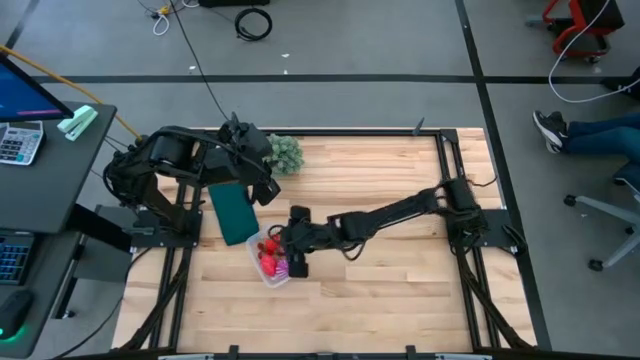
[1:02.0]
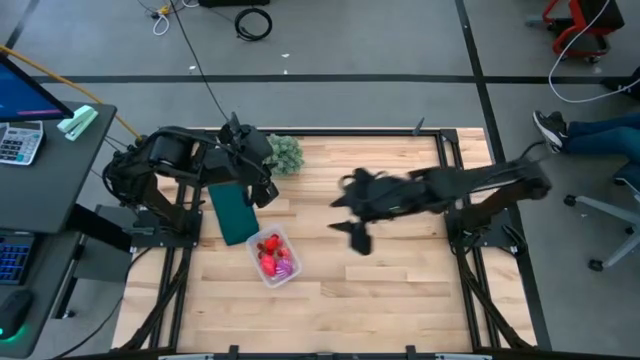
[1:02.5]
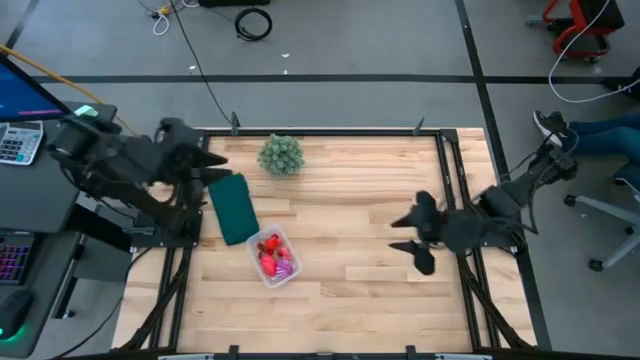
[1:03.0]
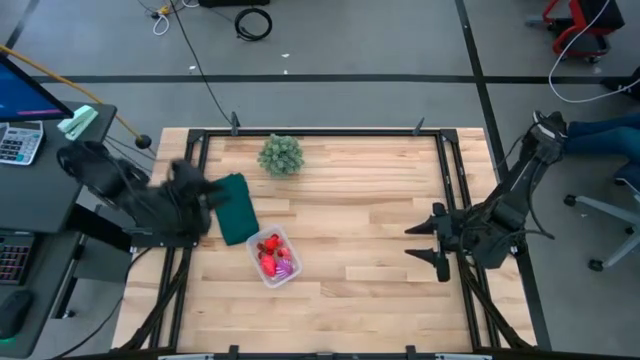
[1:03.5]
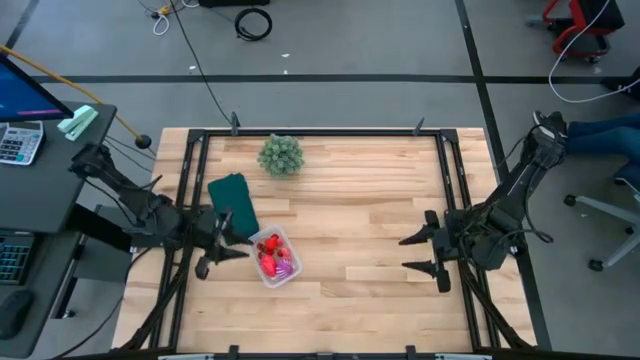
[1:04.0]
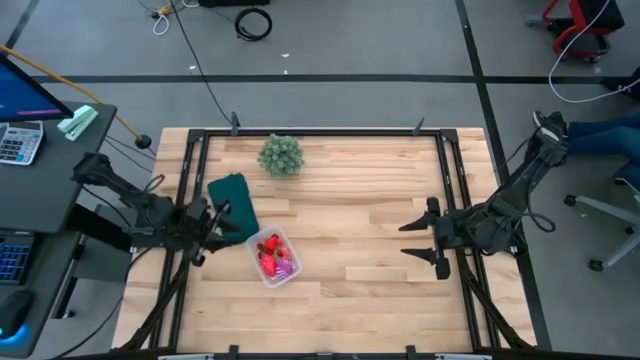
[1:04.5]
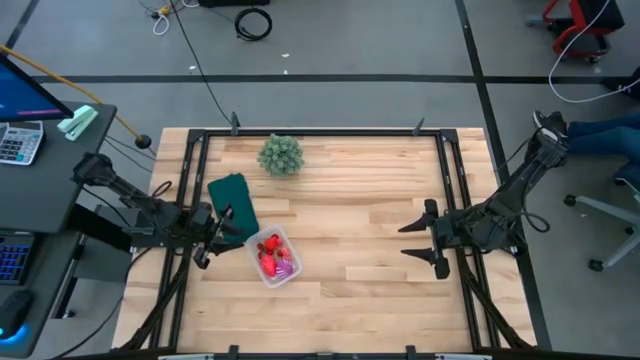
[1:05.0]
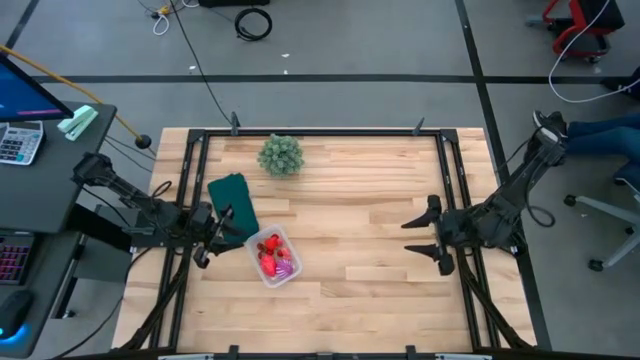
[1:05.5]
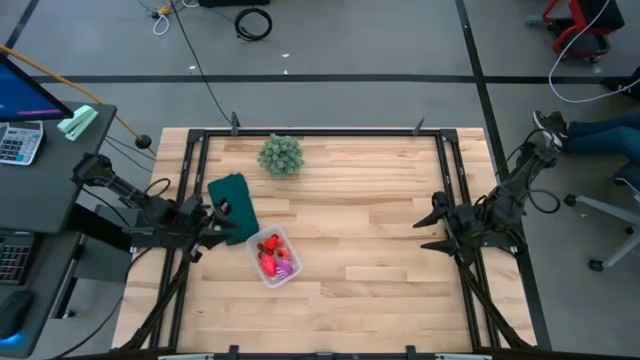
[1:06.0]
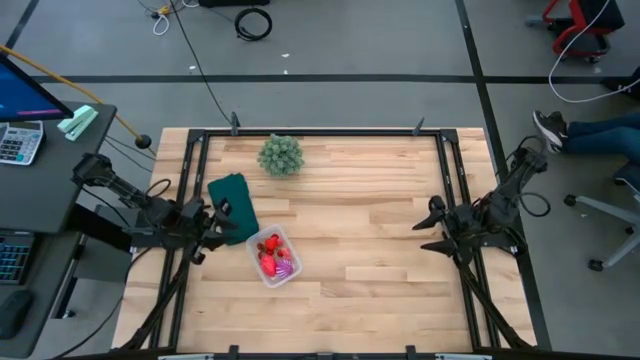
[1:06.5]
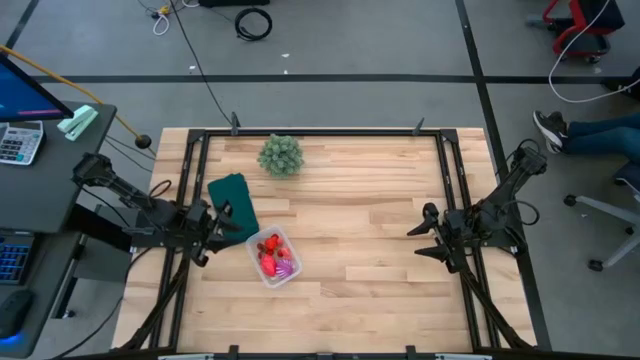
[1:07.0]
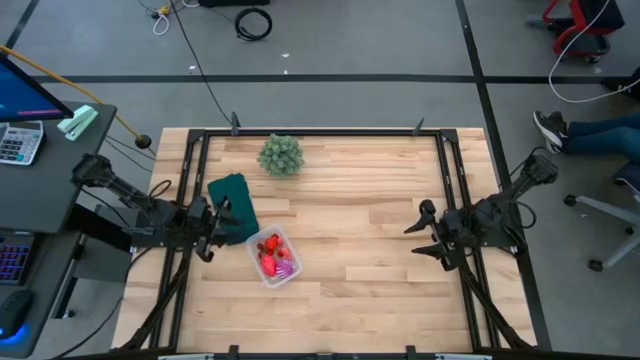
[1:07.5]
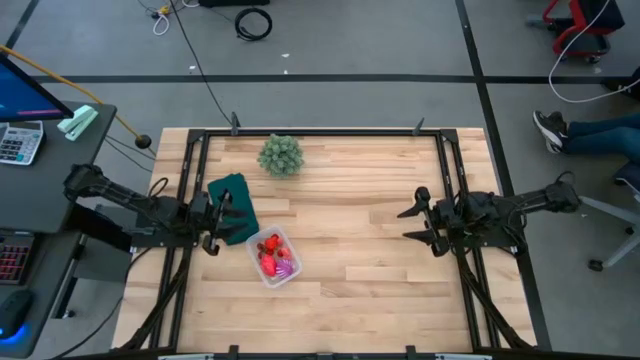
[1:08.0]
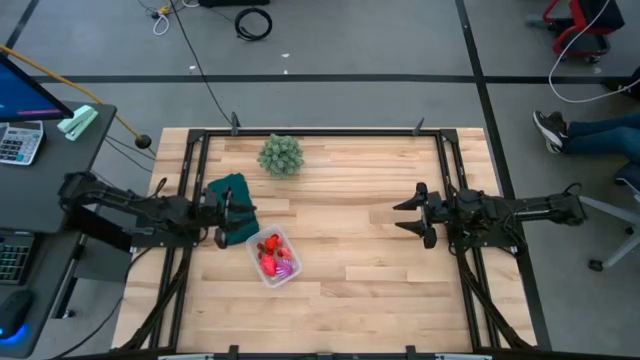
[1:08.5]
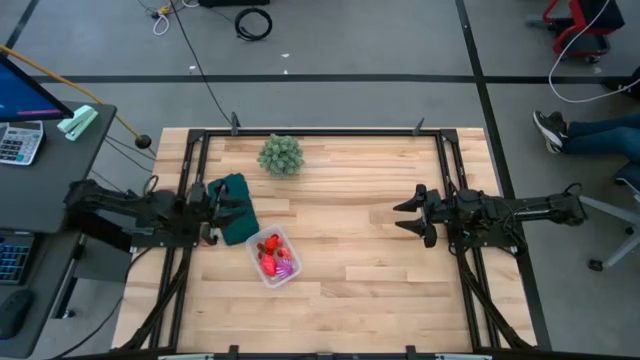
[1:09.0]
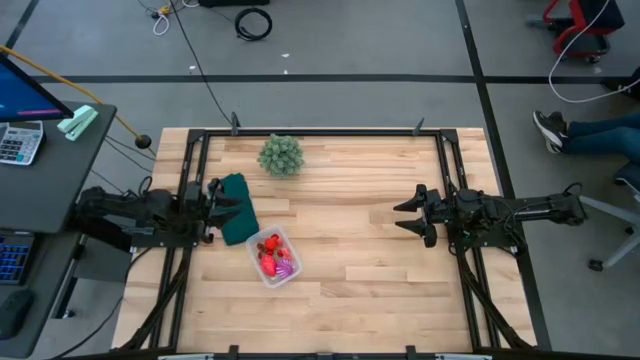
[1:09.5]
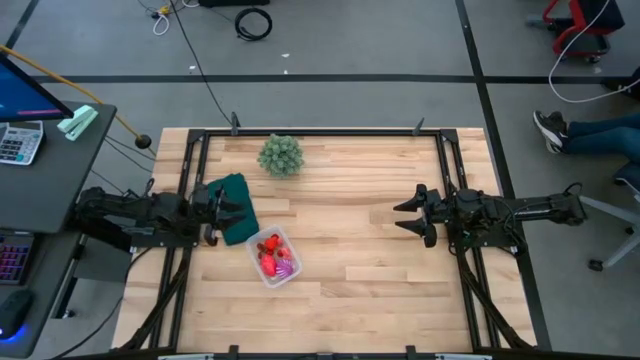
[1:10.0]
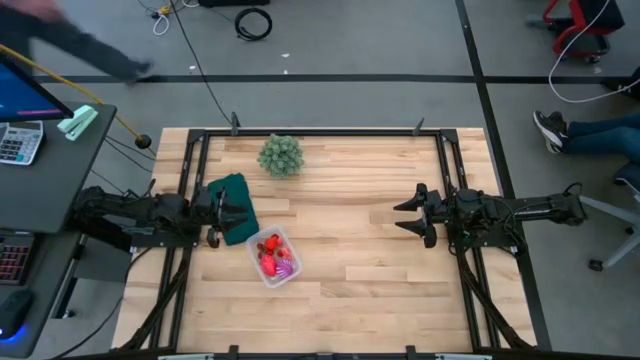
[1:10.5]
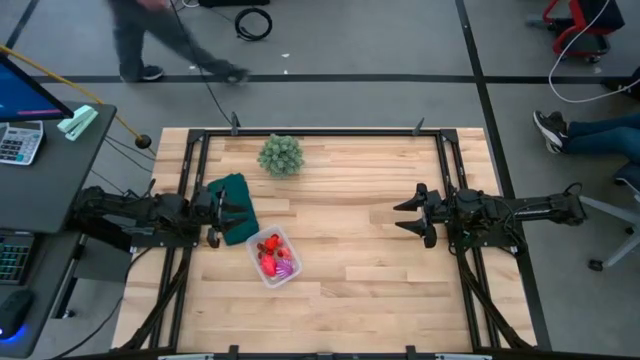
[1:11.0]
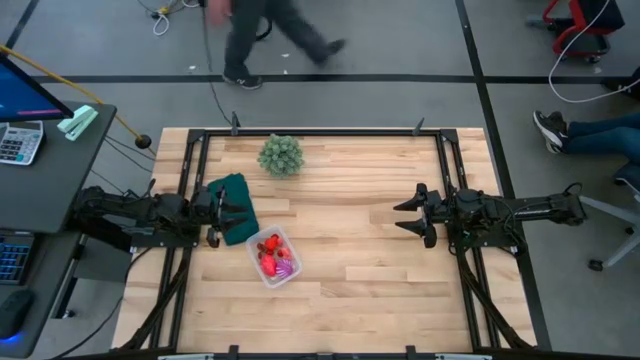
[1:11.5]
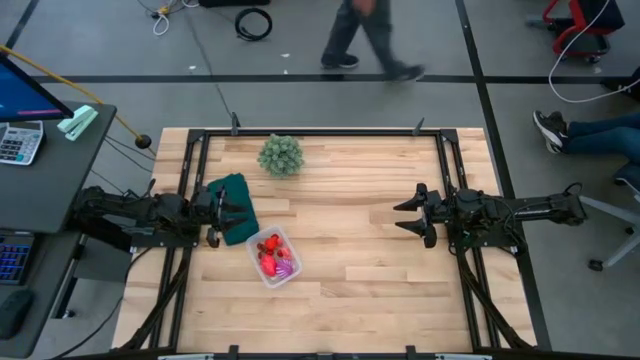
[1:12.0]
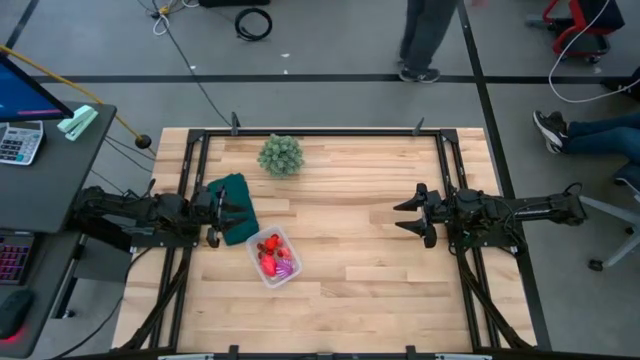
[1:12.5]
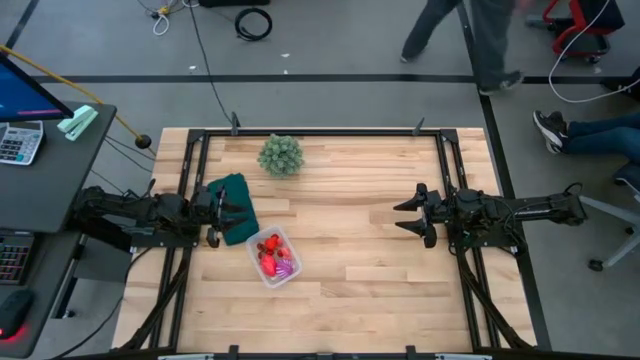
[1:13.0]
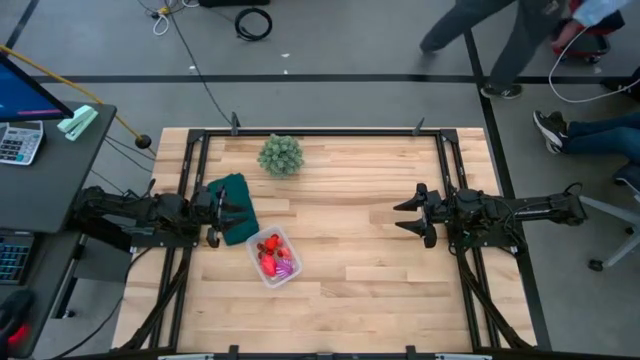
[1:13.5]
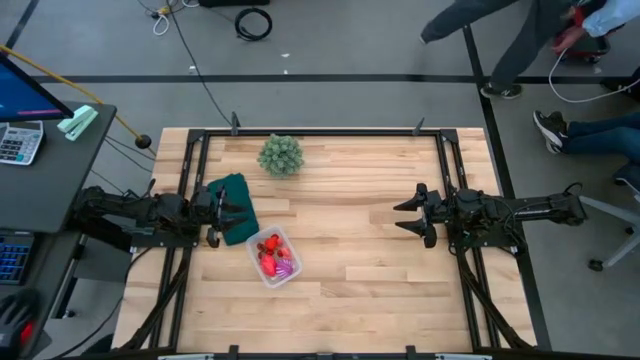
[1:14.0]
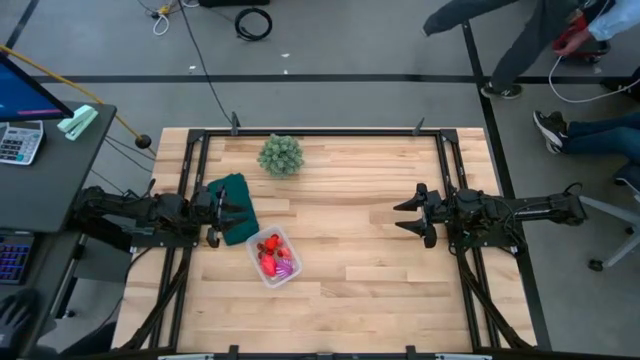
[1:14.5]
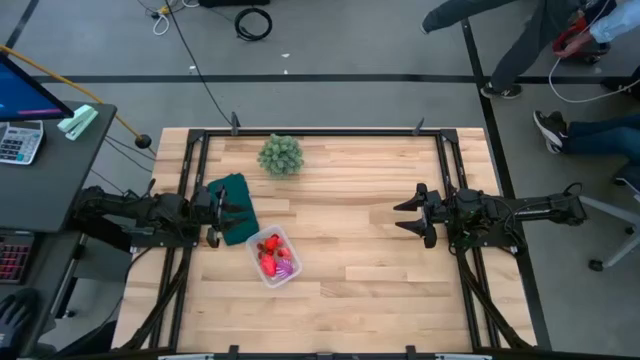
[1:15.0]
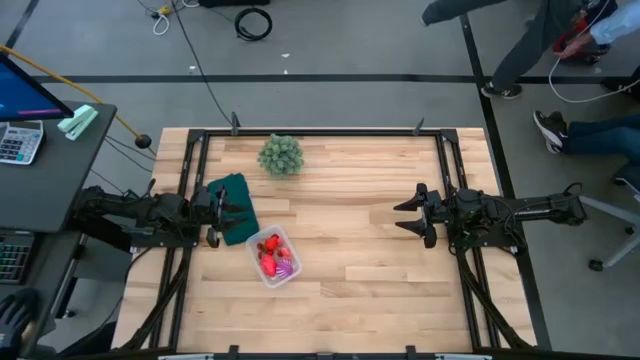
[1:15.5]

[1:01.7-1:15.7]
Task: Pick and placing Produce into tupperware
Return to Home Position

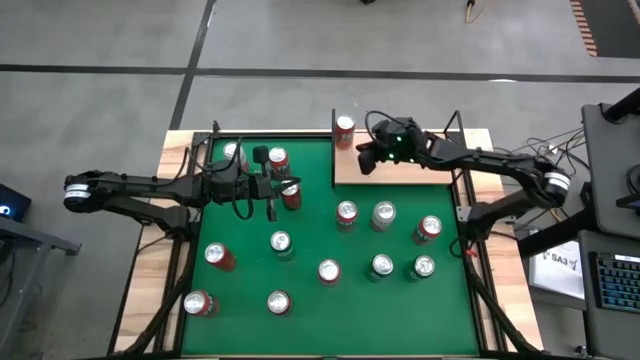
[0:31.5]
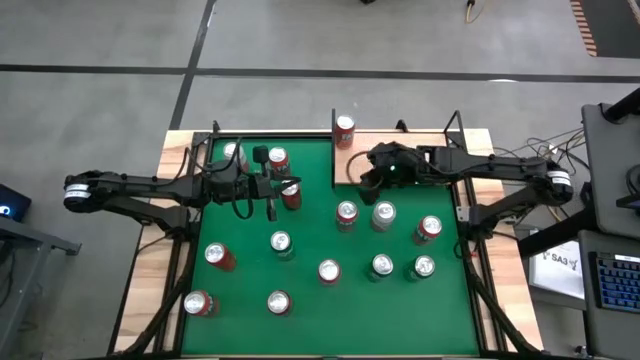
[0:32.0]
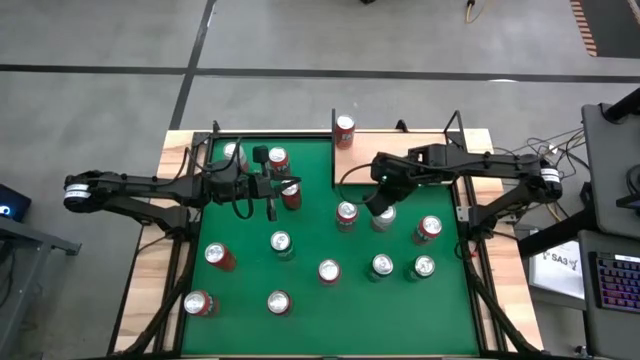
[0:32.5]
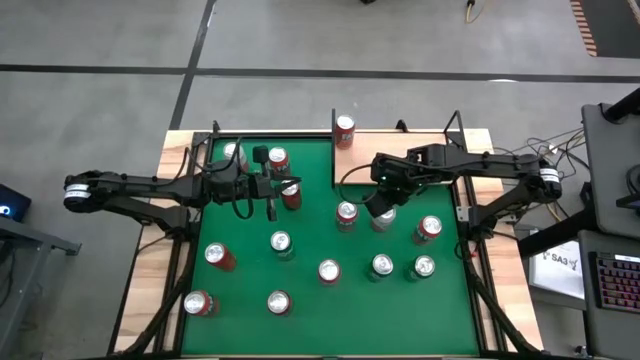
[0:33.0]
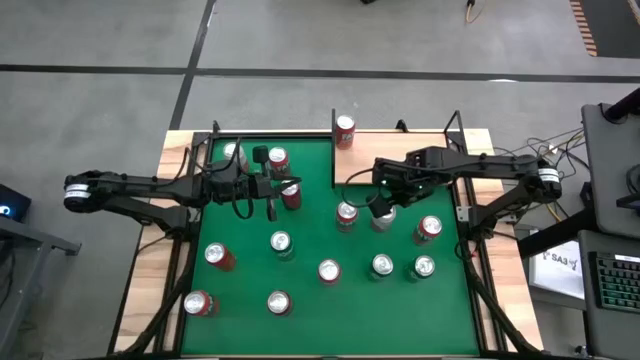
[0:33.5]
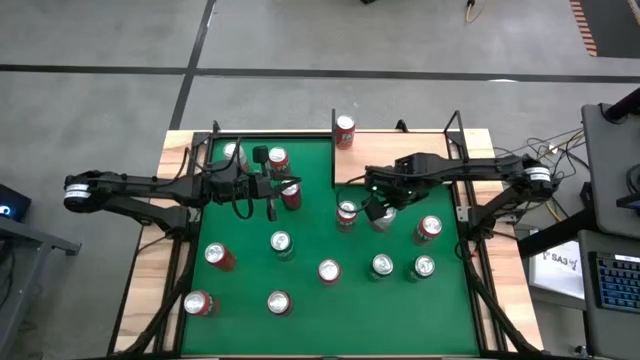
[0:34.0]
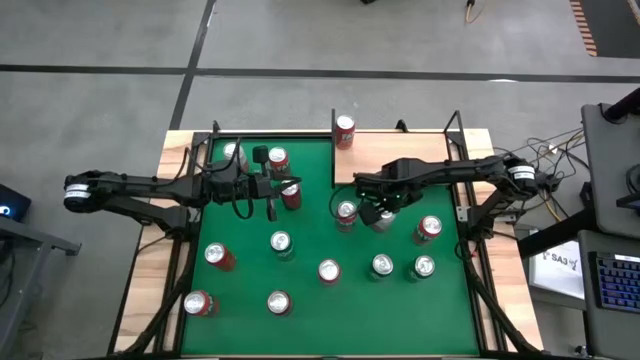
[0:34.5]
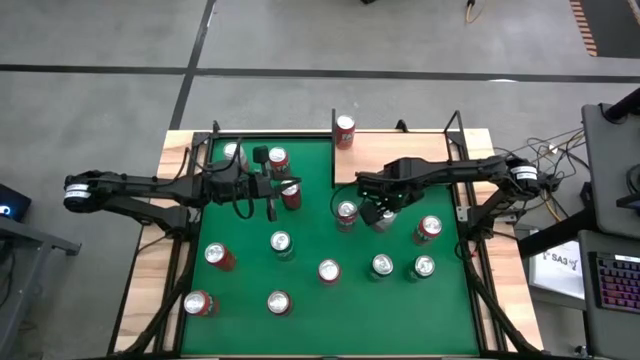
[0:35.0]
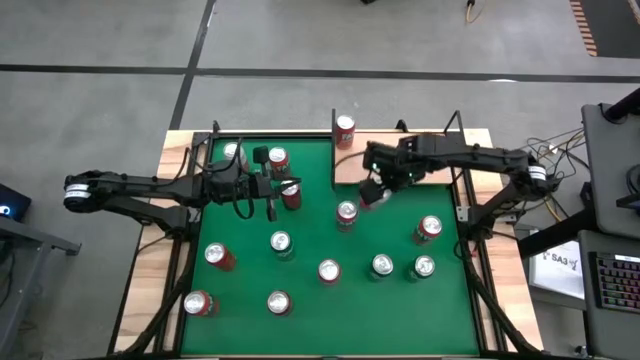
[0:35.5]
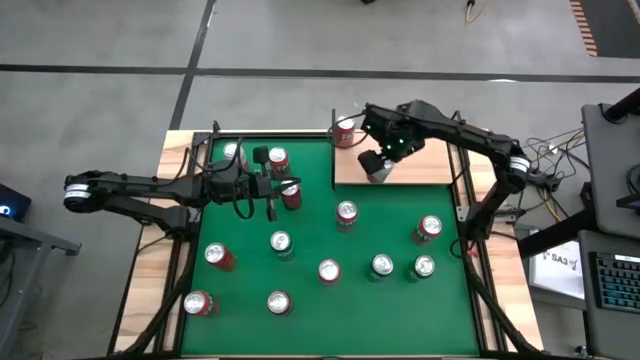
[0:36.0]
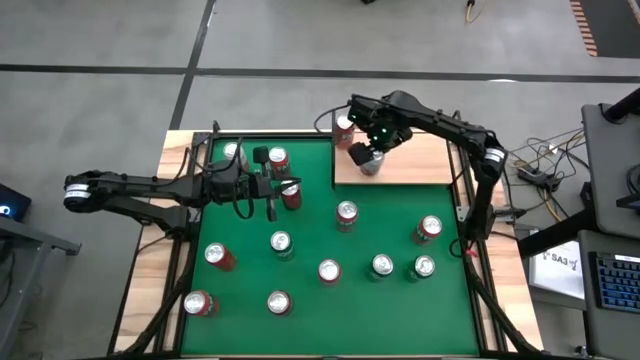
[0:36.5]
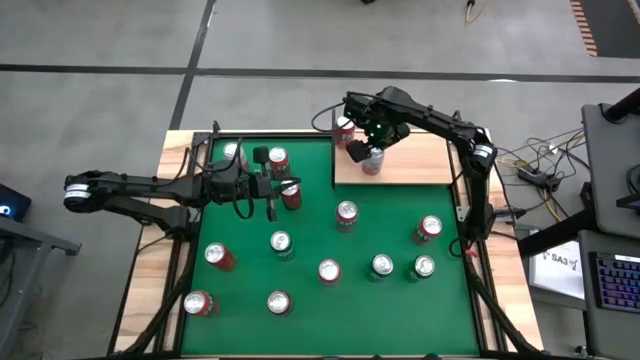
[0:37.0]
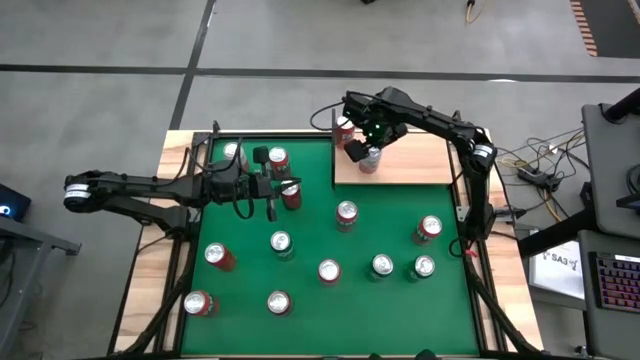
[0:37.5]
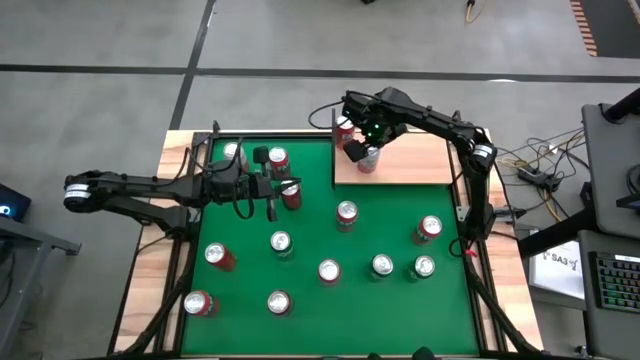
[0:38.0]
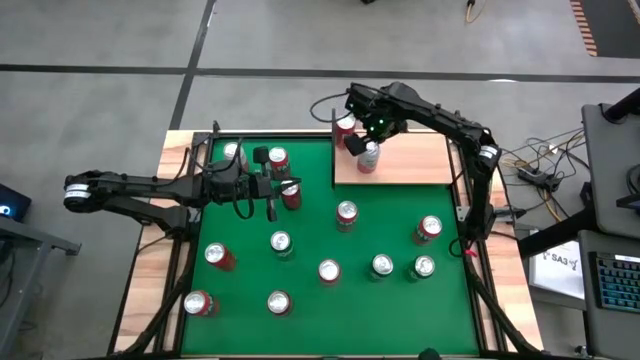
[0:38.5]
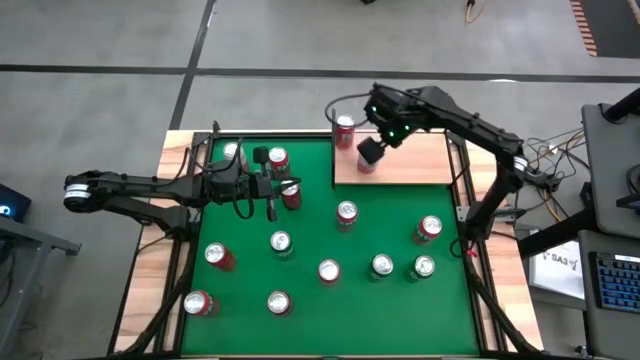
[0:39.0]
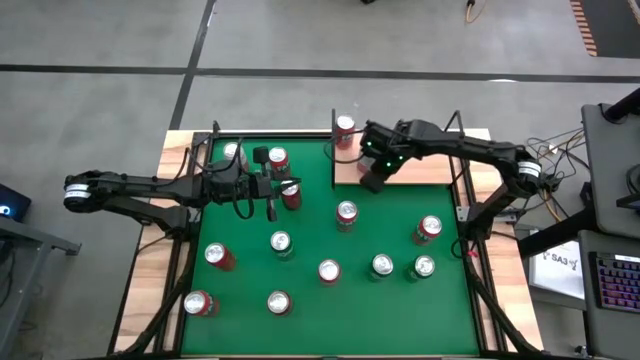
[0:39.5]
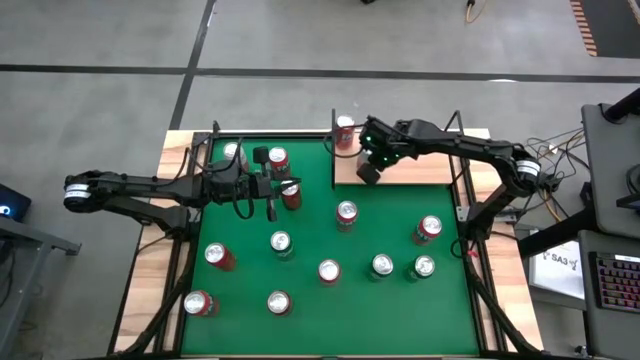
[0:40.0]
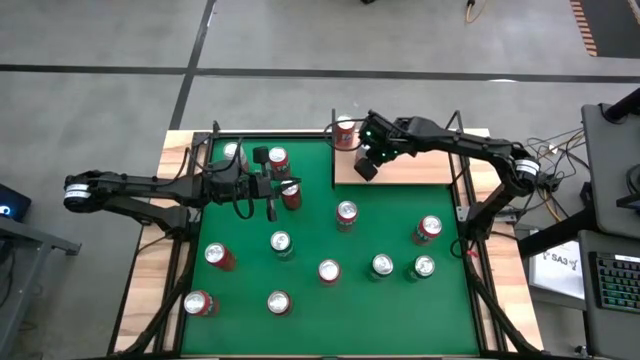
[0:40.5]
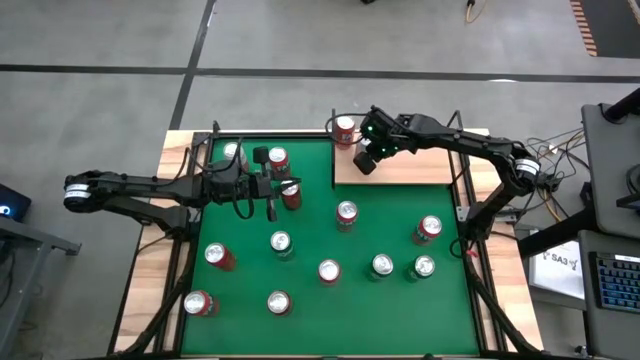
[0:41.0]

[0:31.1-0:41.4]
Task: Place canned beverage on shelf
Put the right pink/white soda can on the shelf
